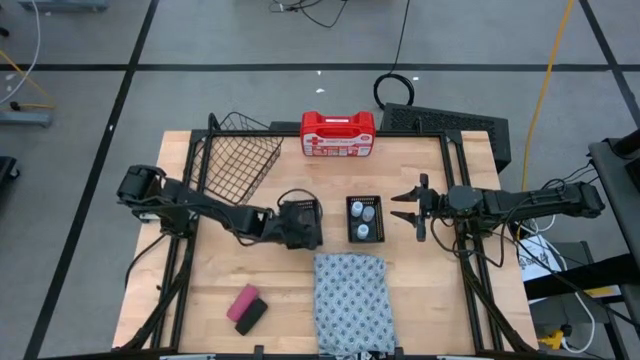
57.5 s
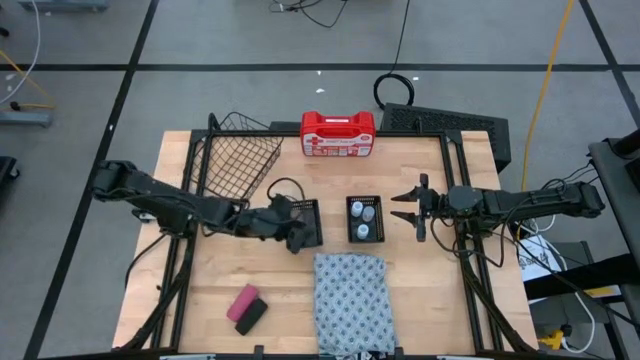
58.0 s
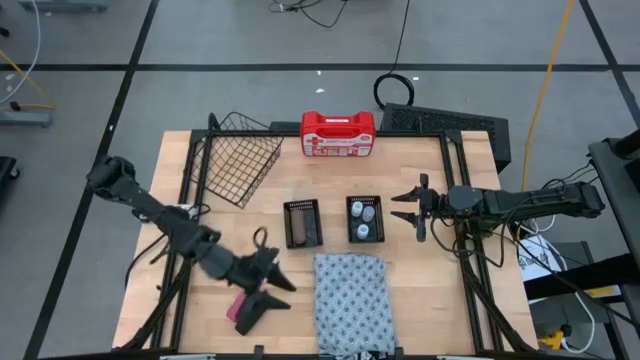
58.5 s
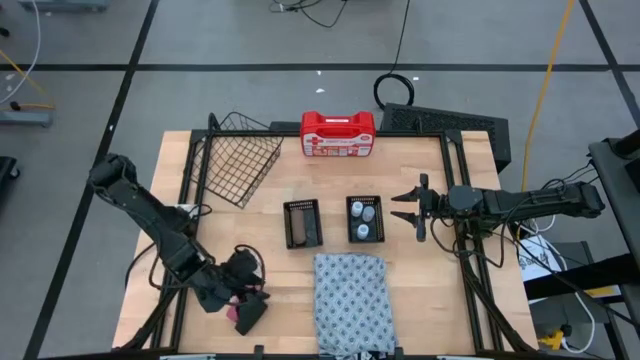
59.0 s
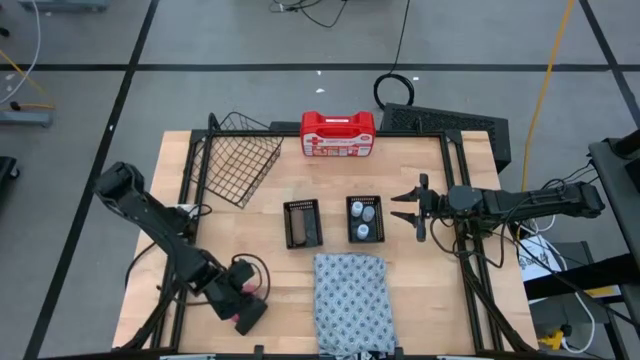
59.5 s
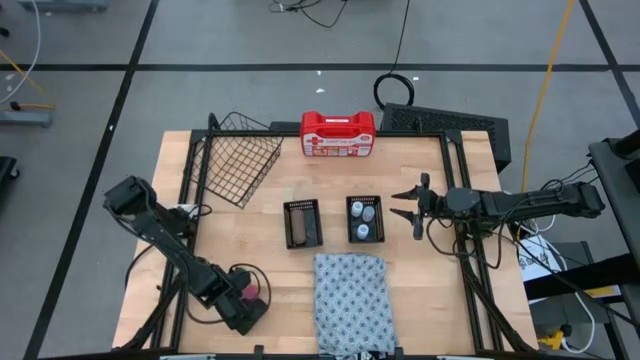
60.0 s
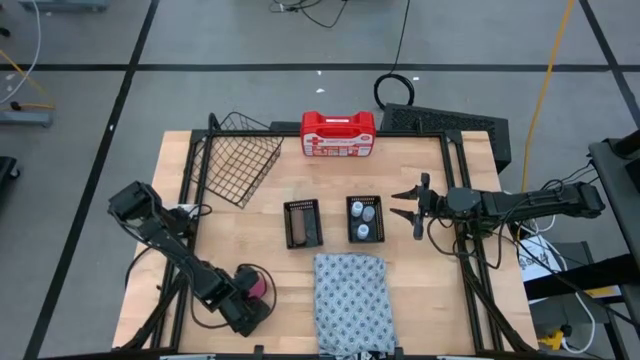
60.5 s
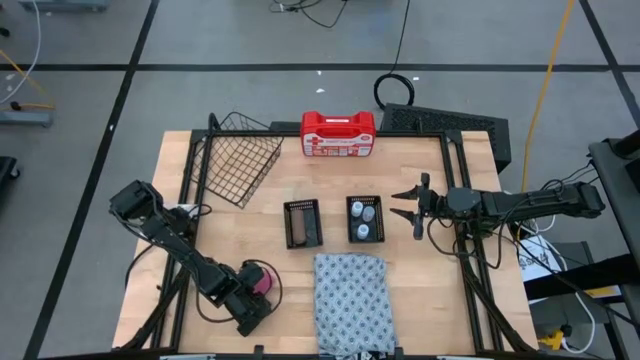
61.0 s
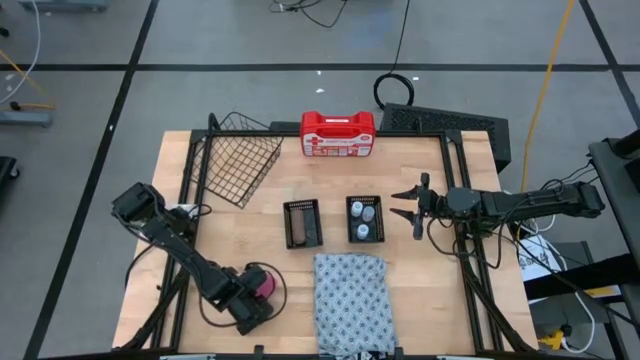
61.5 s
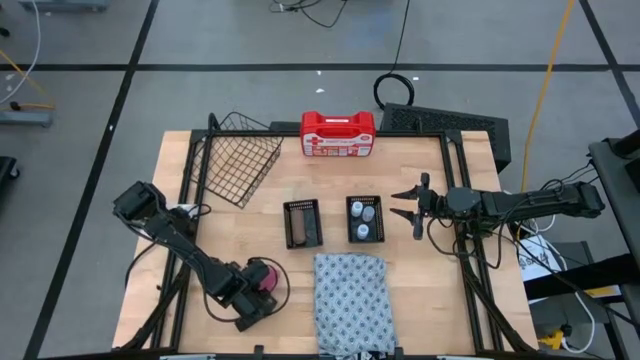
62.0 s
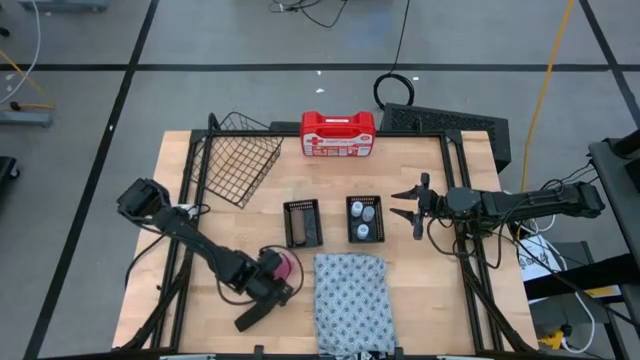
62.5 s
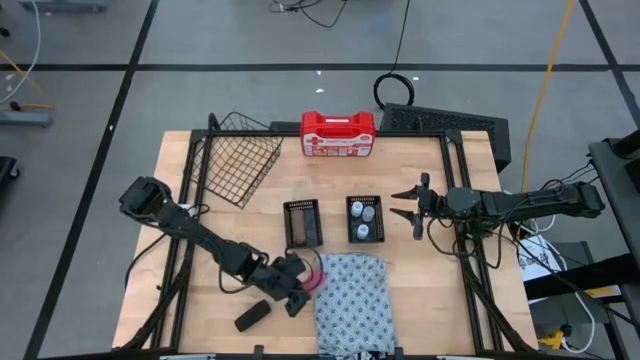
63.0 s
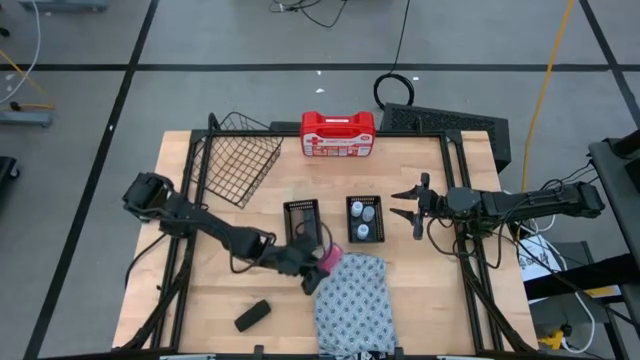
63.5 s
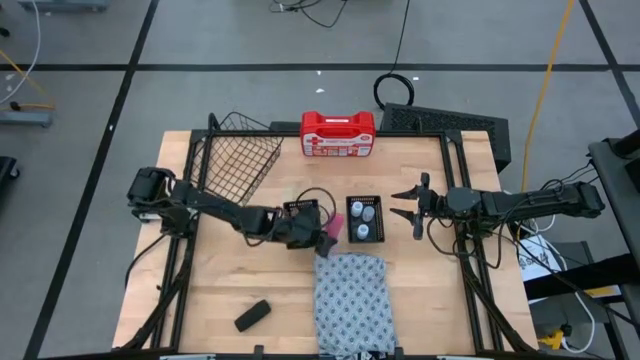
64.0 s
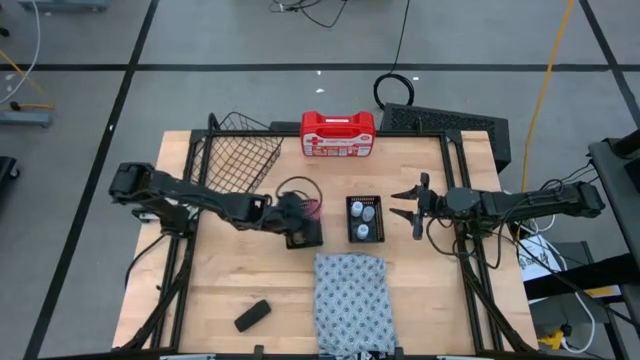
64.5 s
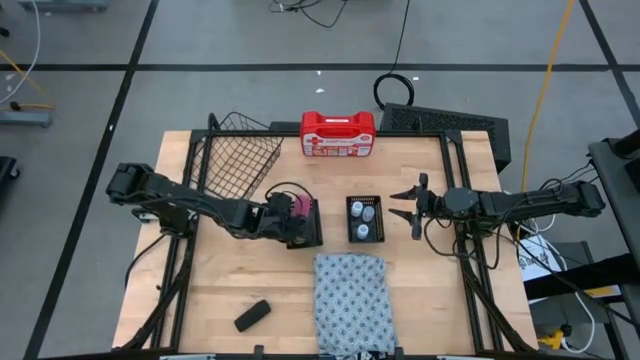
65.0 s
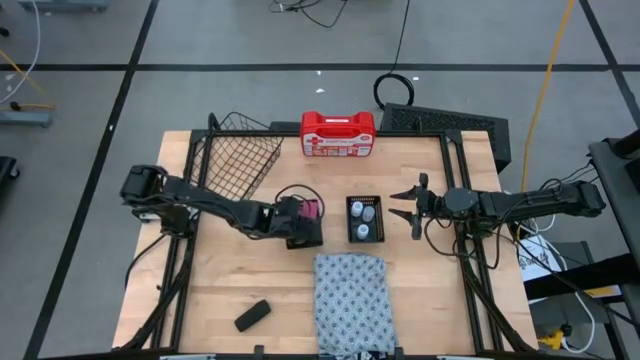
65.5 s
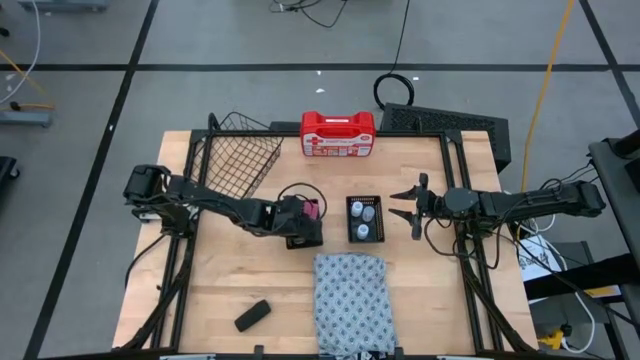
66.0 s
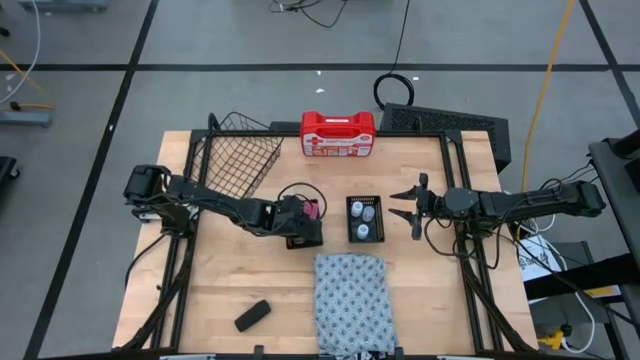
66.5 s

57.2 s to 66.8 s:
Task: Pick & Place Medicine items
Put the pink bandage into the left black basket

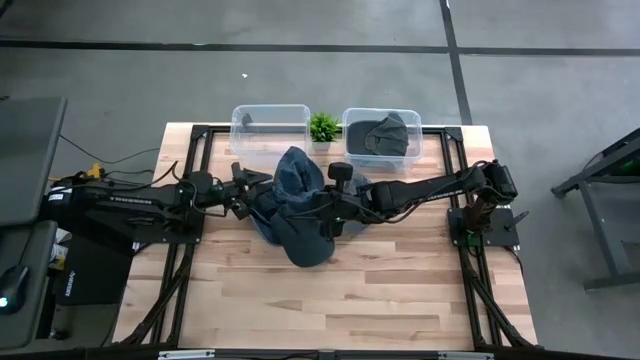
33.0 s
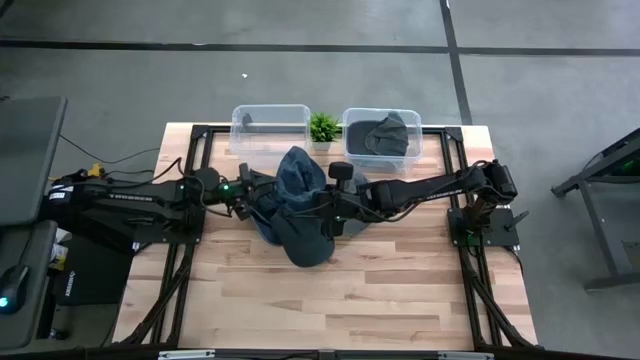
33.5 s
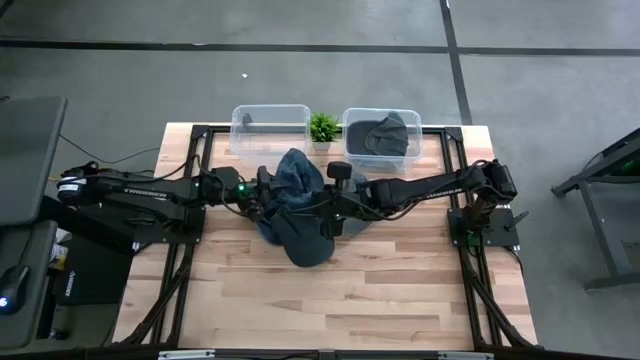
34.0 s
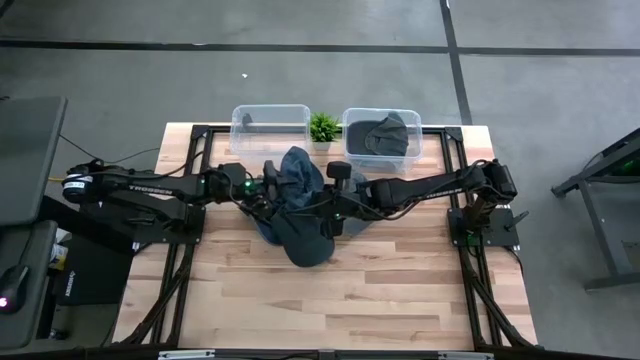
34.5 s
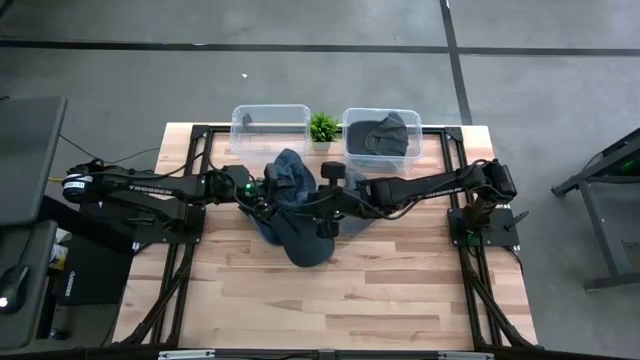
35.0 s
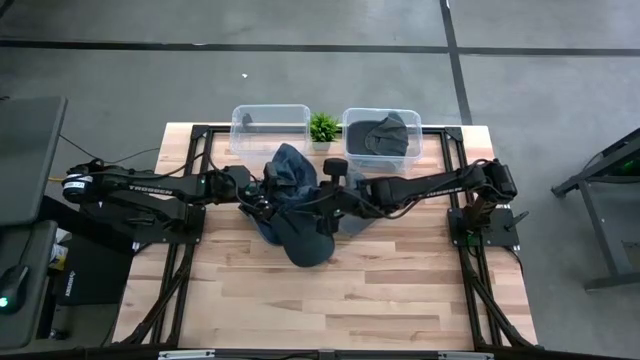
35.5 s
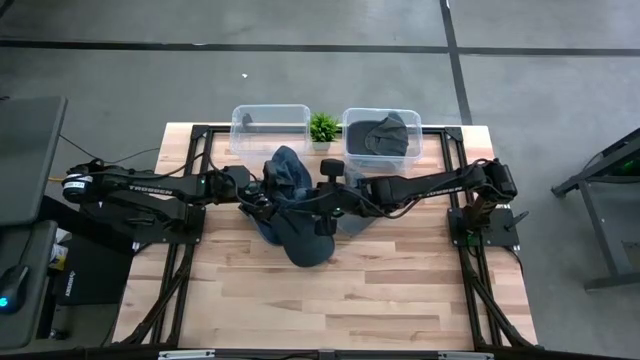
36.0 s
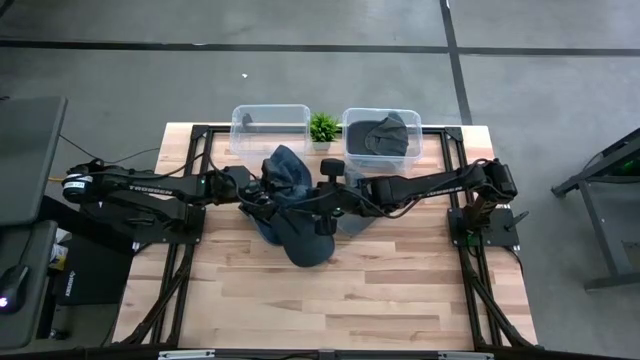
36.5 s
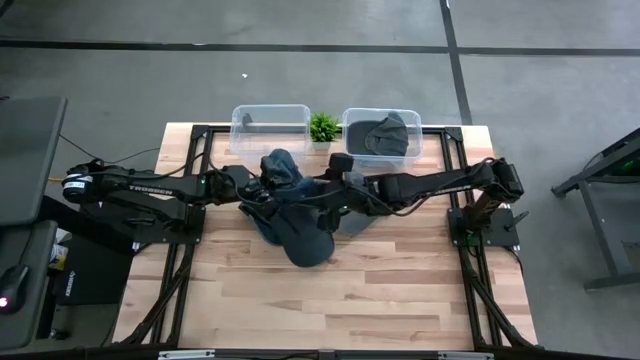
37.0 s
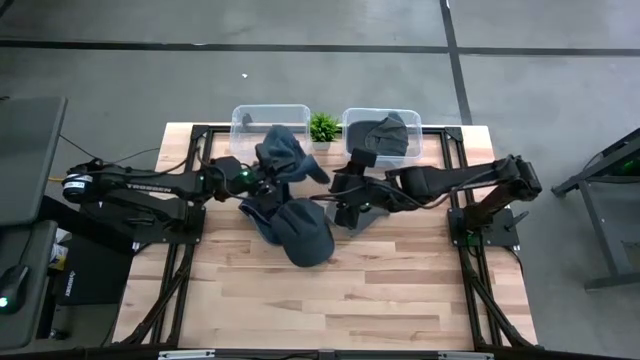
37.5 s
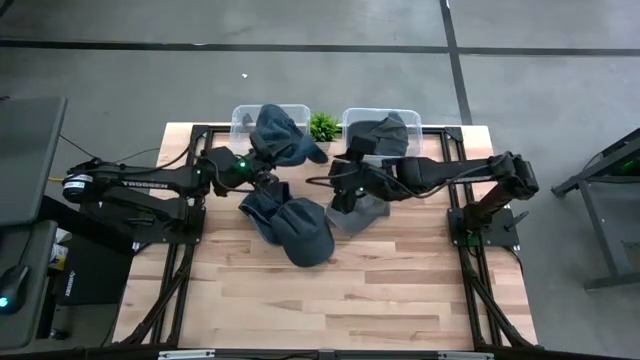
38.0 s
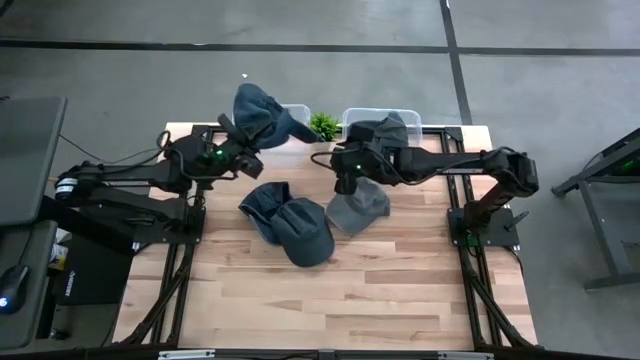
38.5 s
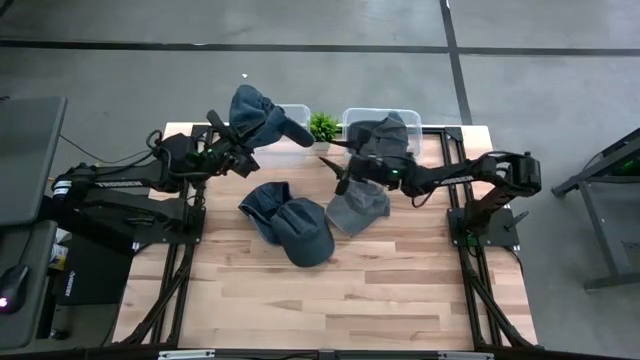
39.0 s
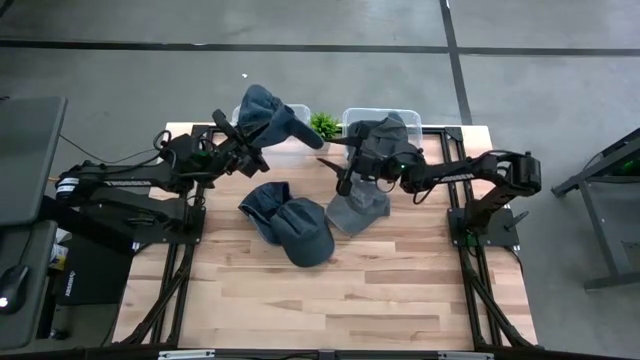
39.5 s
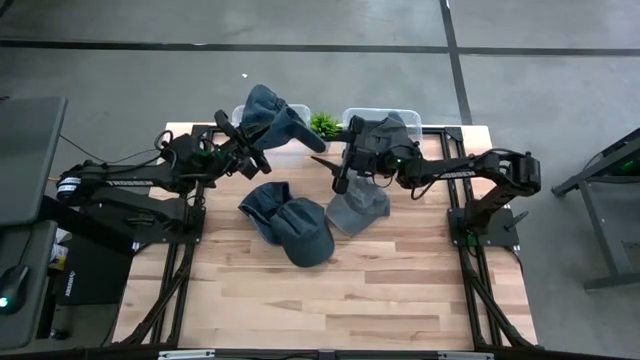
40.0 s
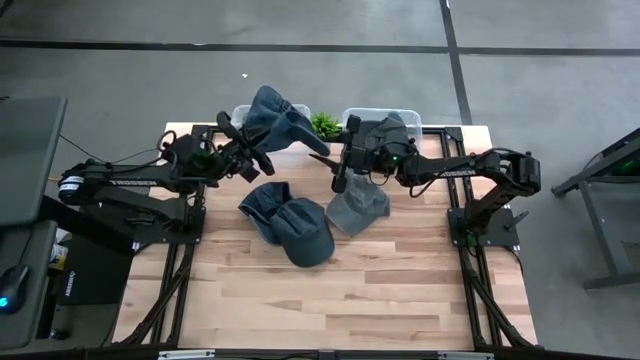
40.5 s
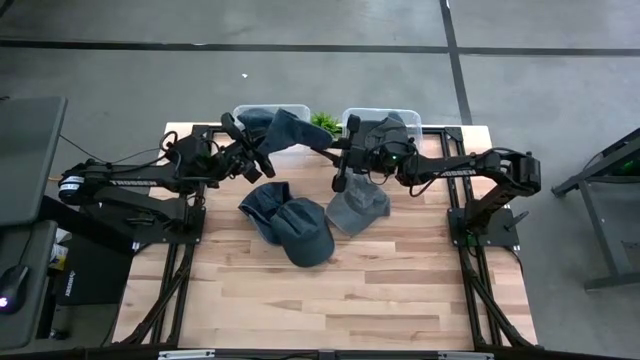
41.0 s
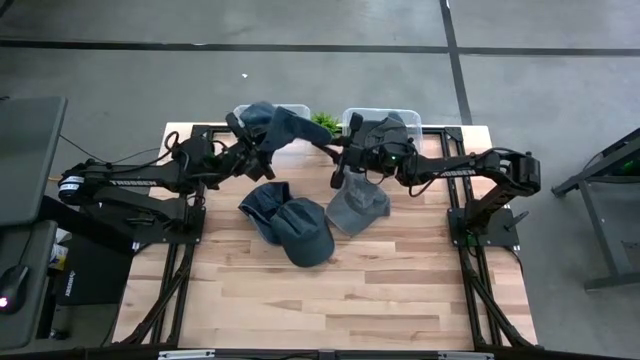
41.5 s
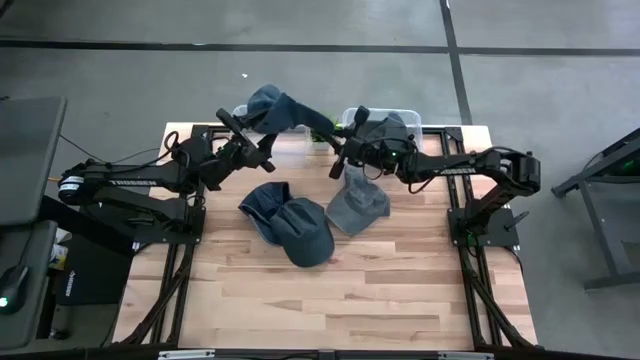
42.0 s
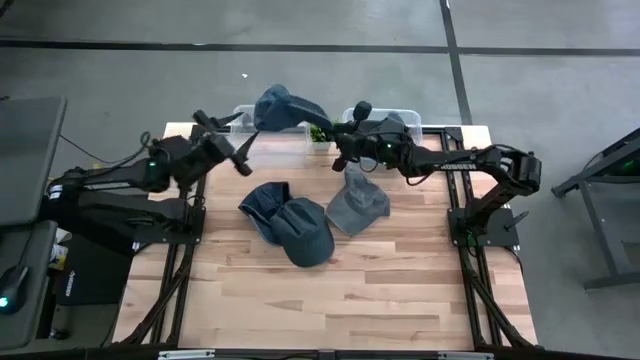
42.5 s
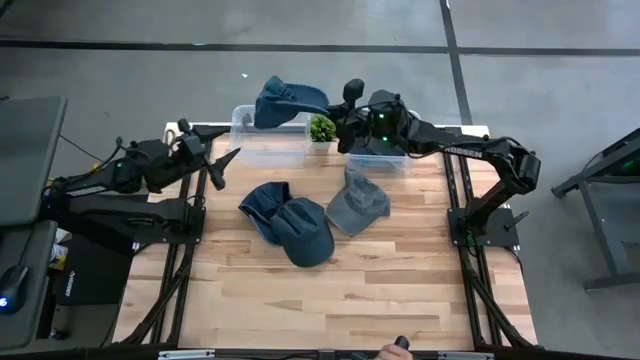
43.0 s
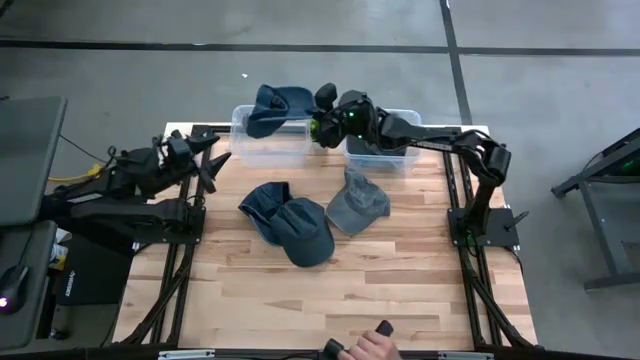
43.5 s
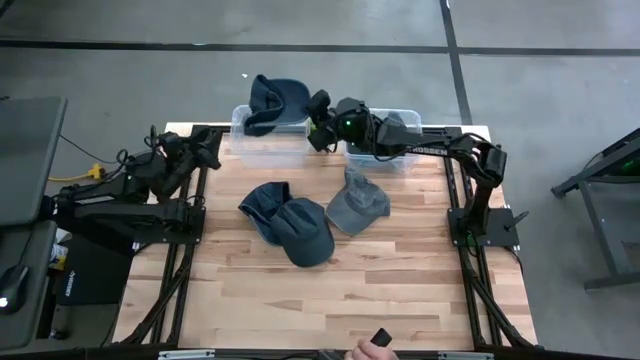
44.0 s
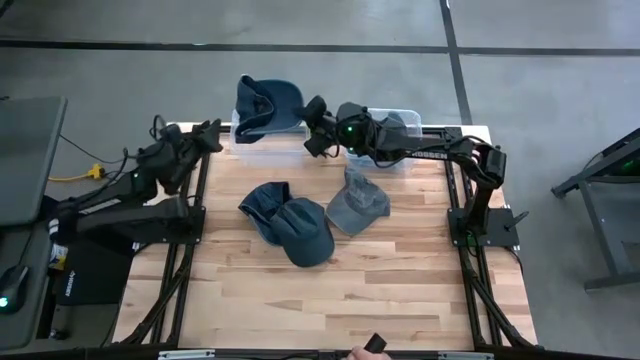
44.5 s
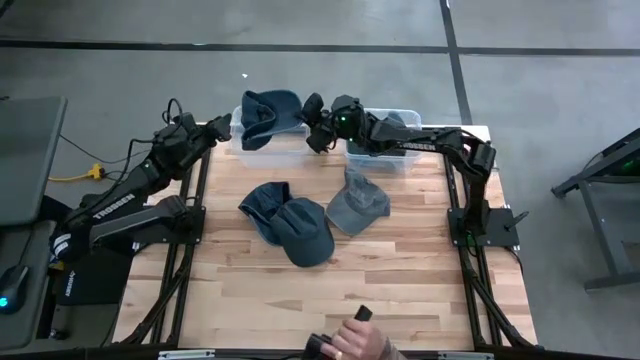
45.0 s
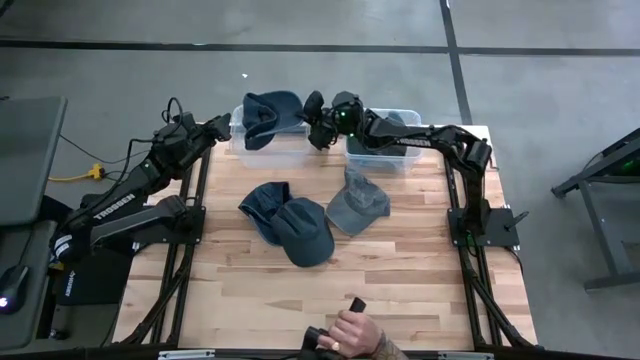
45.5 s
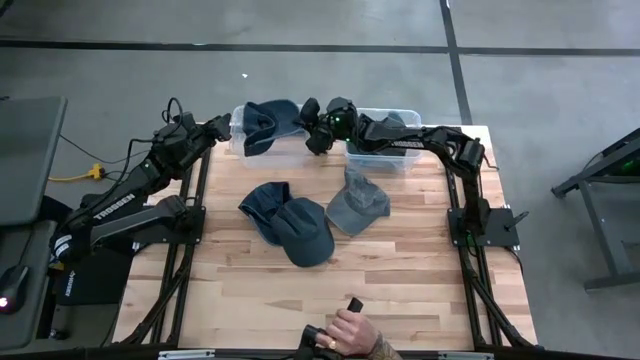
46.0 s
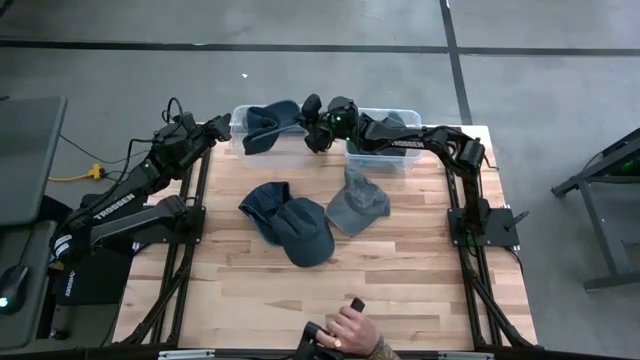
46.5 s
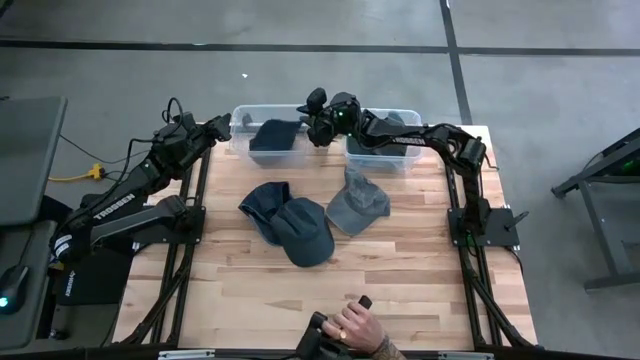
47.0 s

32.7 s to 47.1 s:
Task: Pick & Place hat
Put the right blue cap into the left transparent bin
